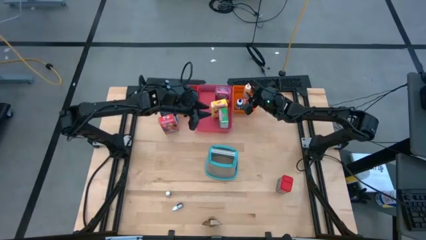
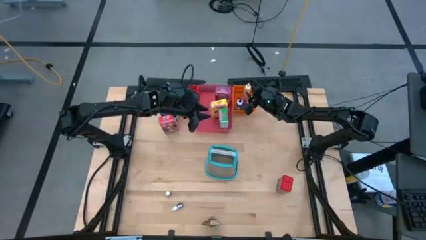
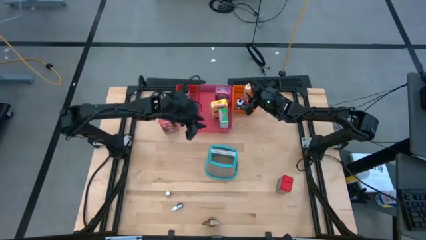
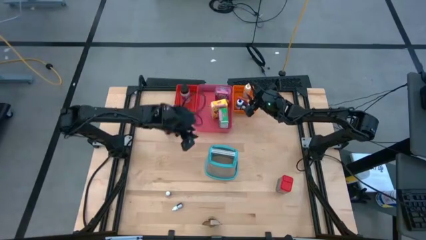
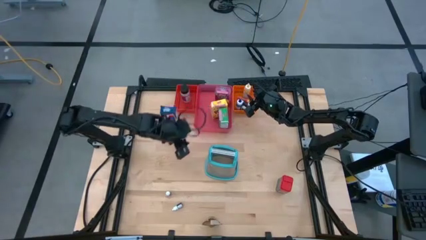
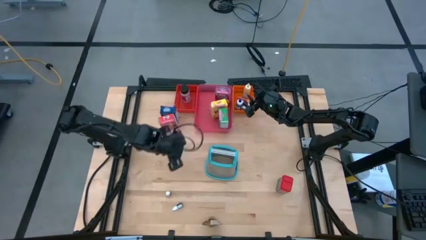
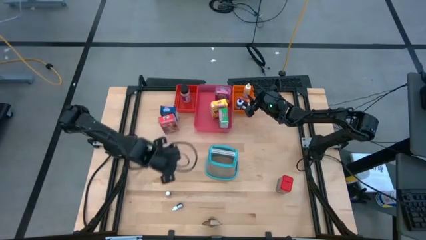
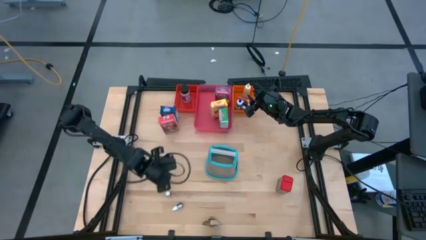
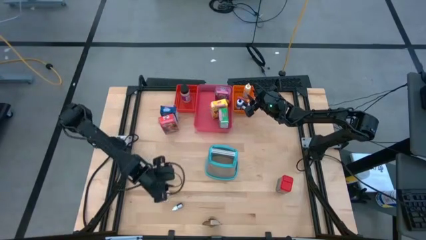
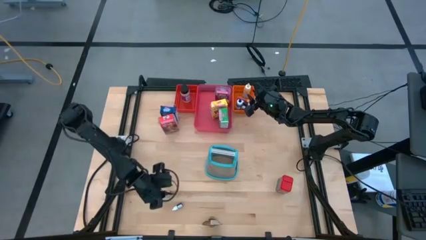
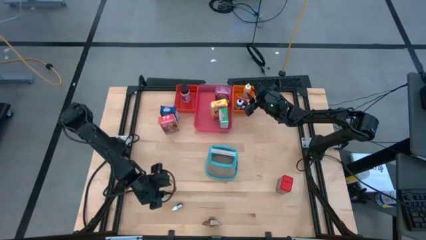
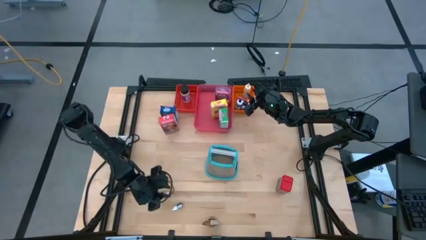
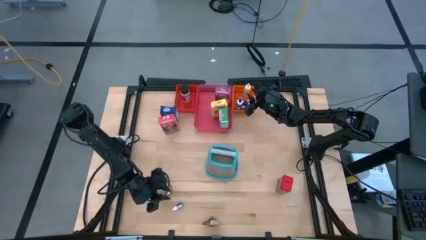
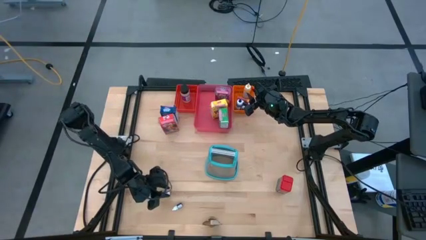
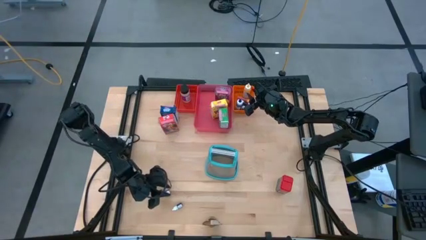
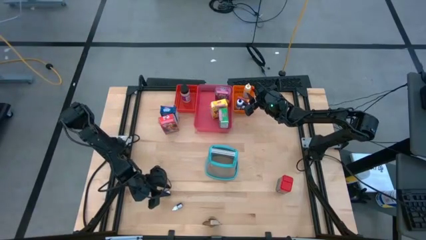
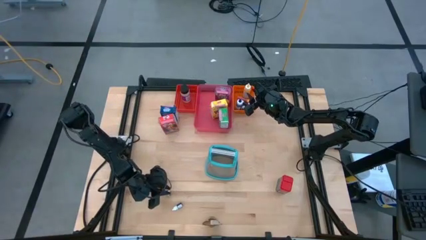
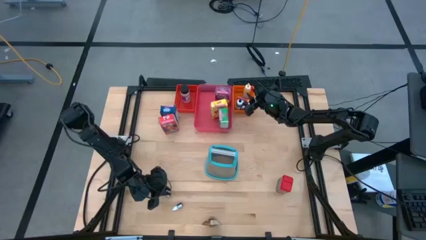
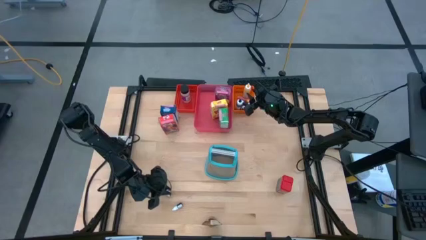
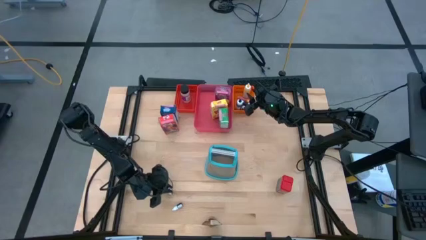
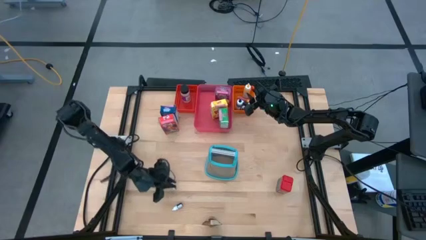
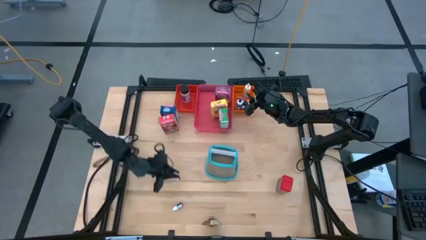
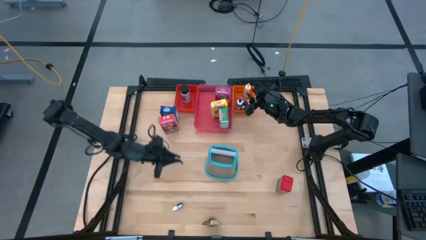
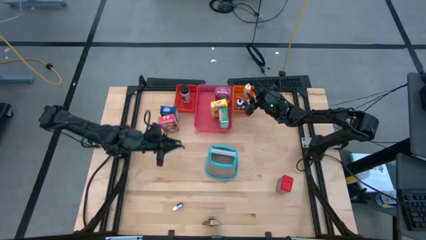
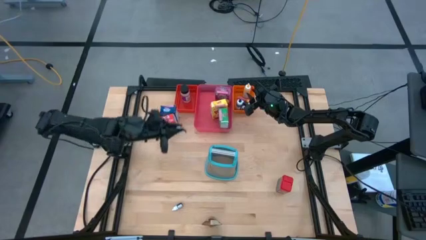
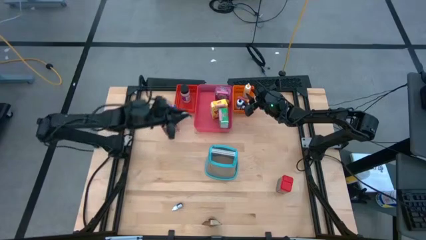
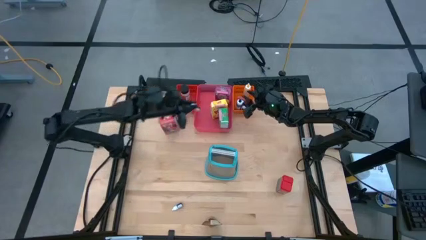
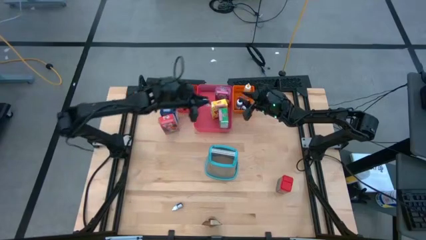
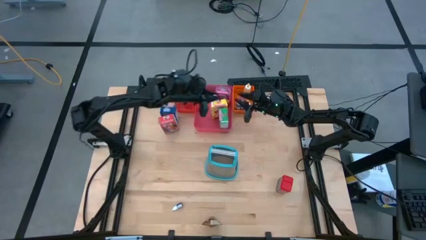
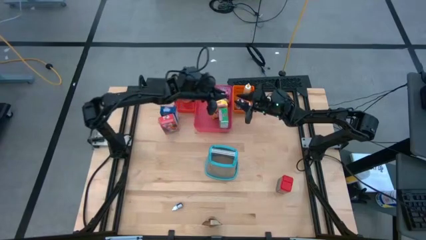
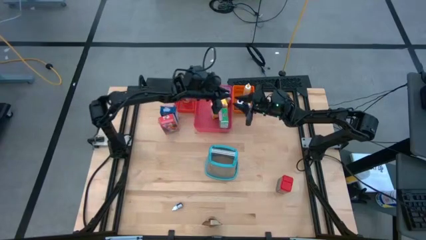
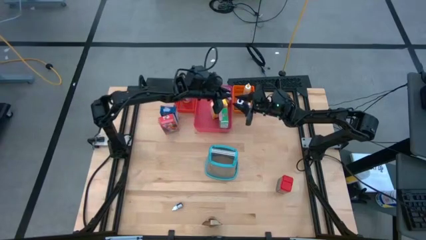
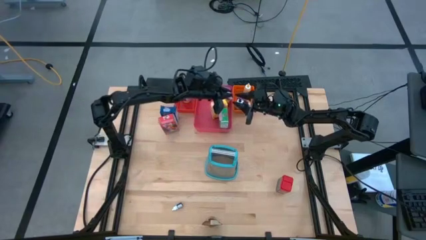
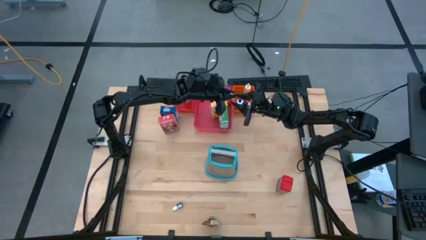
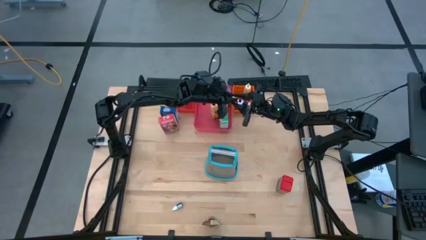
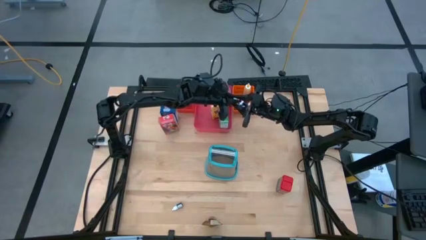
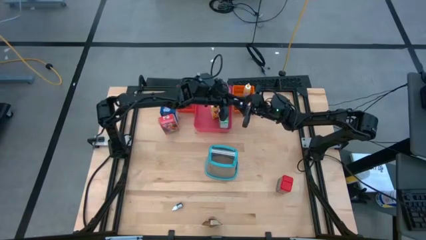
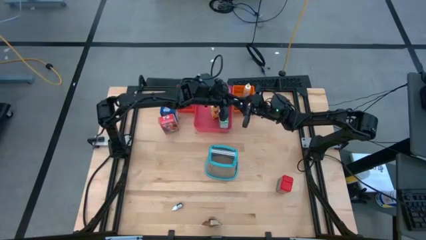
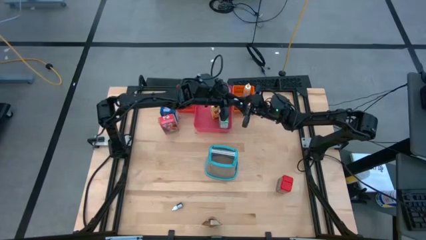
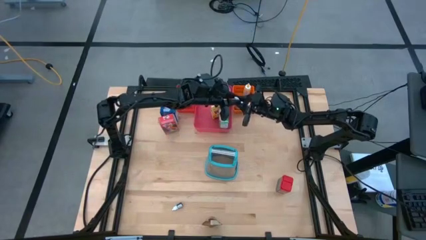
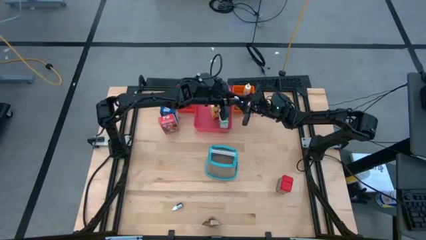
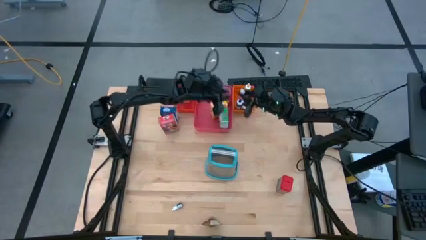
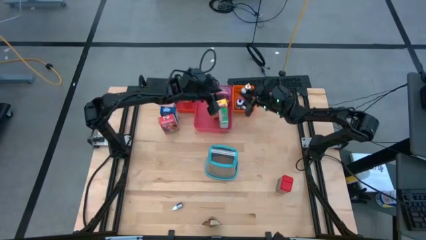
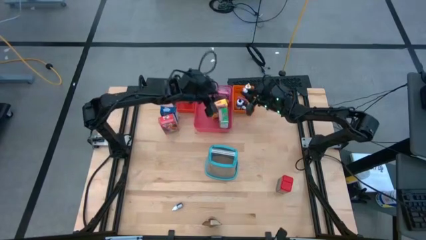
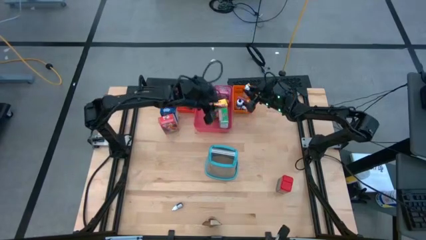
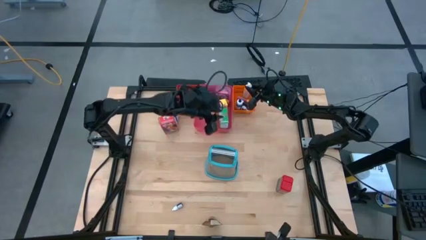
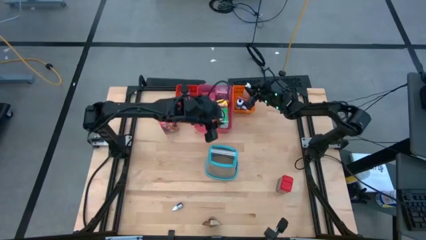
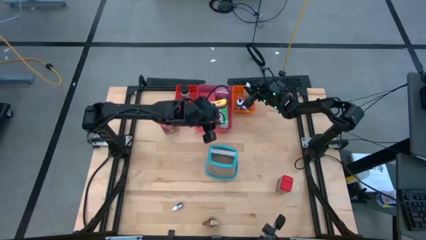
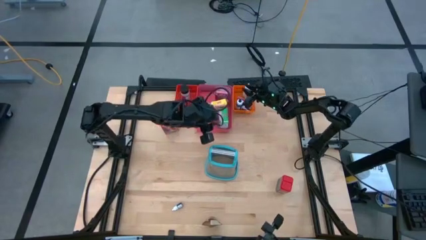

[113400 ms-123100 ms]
Task: Pick & Place Kitchen Items
Put the small orange food coloring bottle into the orange bin

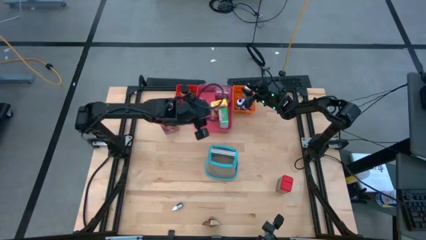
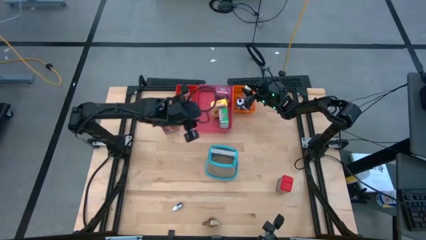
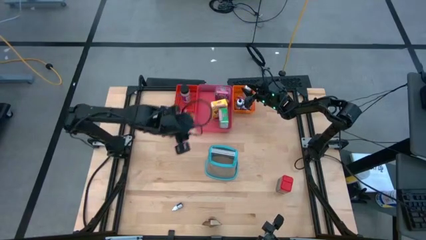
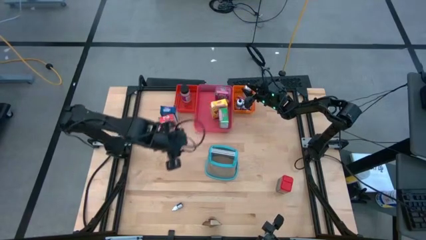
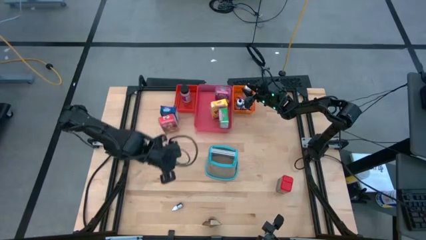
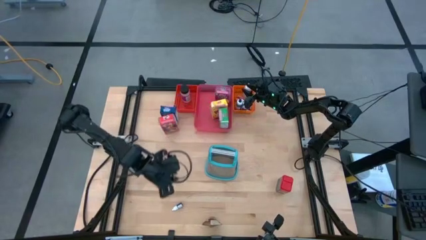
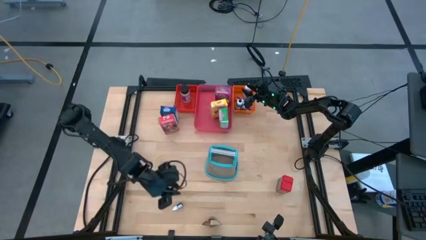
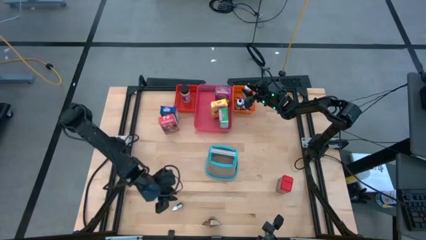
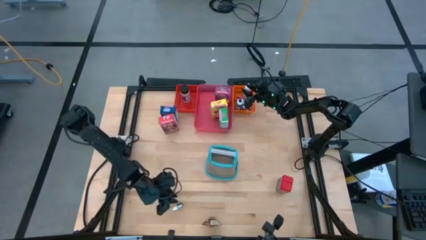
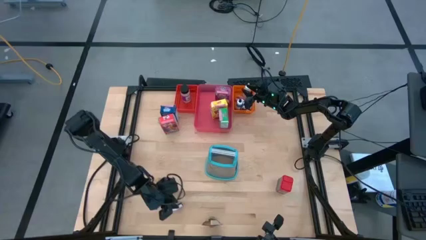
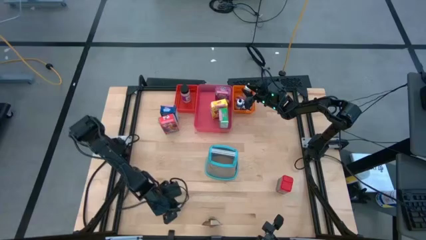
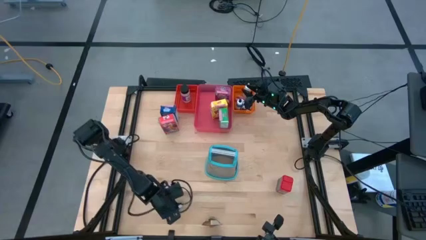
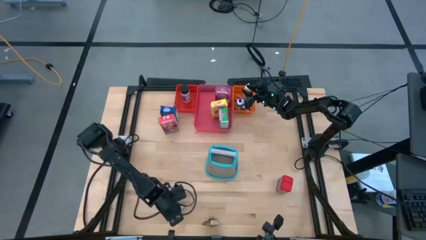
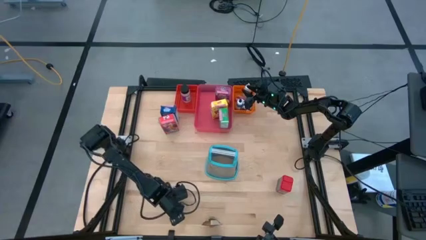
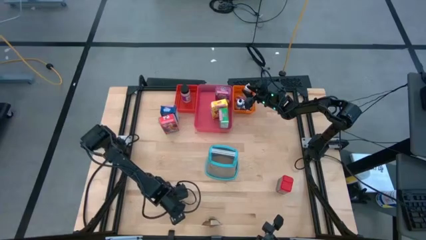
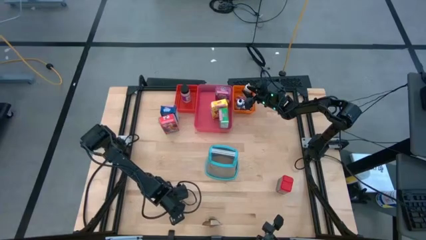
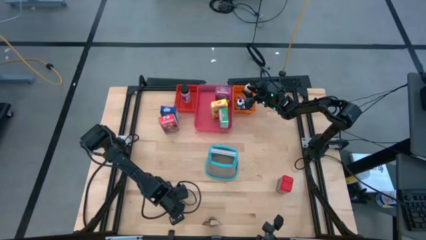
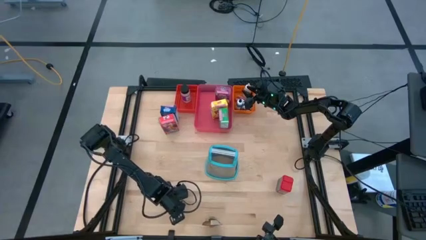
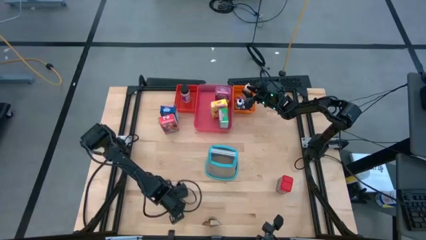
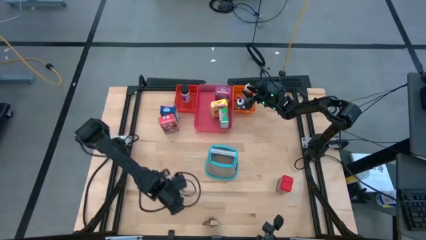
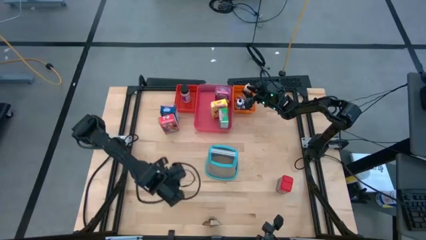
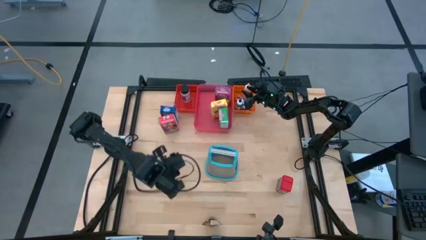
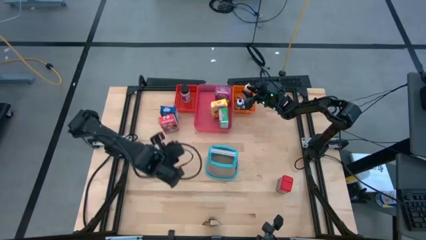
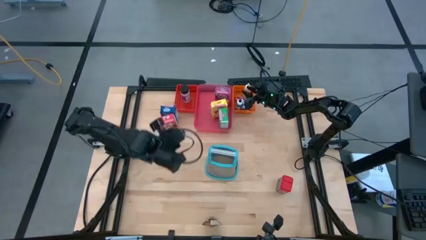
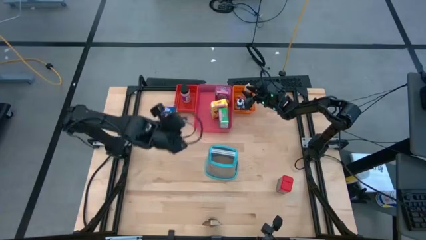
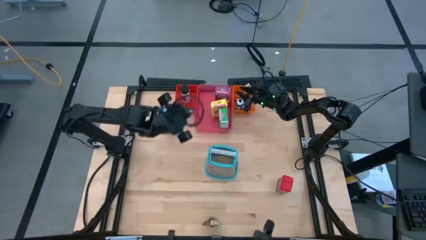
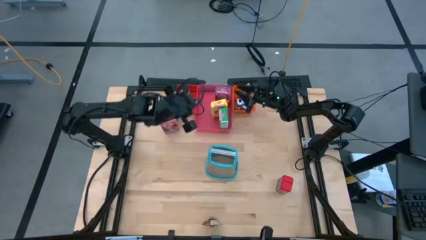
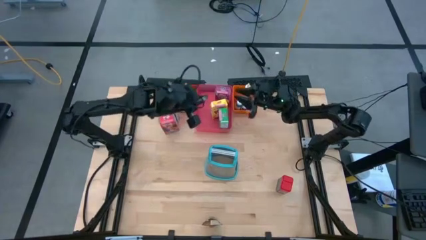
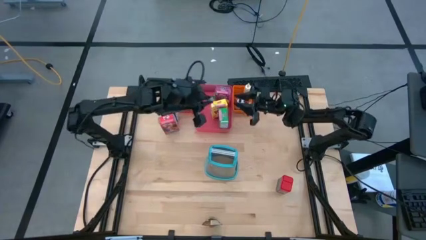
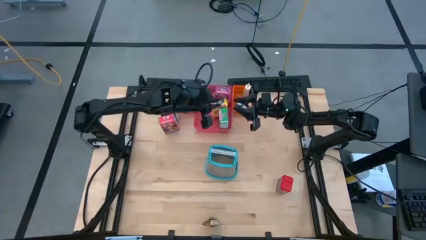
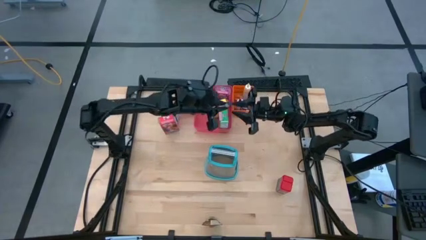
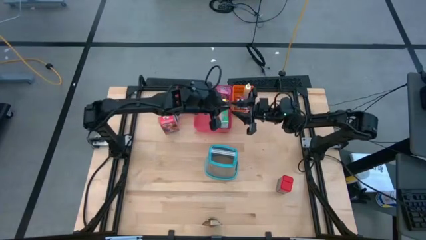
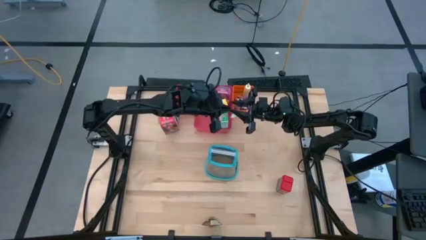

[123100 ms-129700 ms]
Put the small brown food coloring bottle into the orange bin
